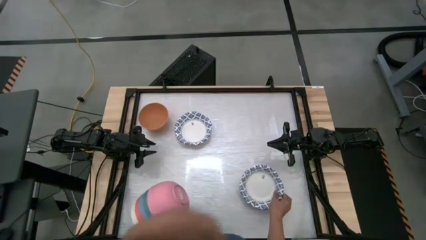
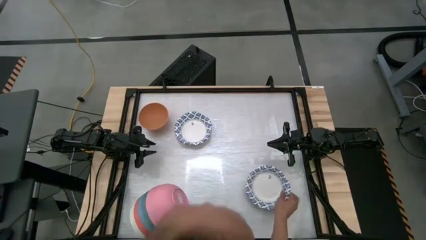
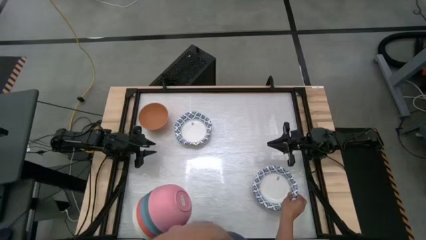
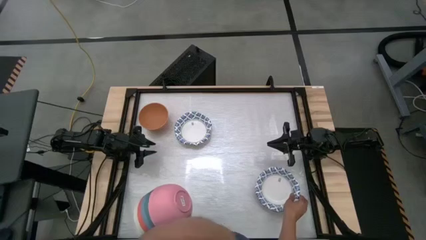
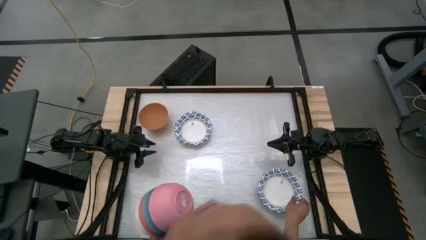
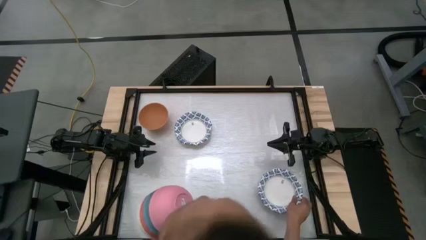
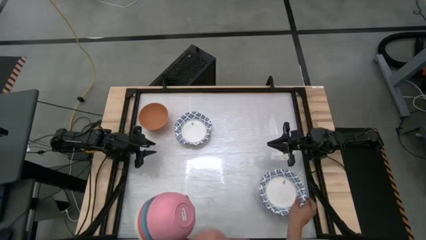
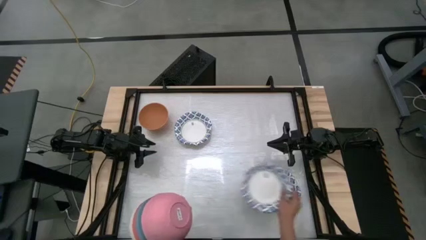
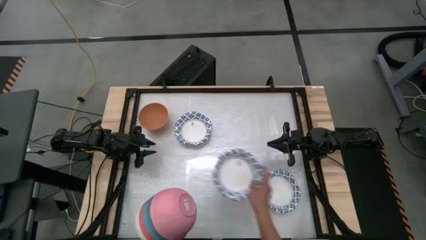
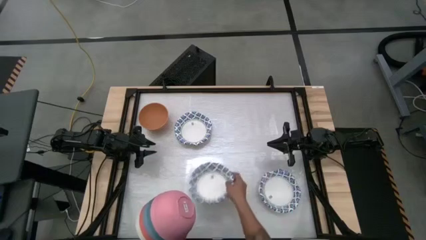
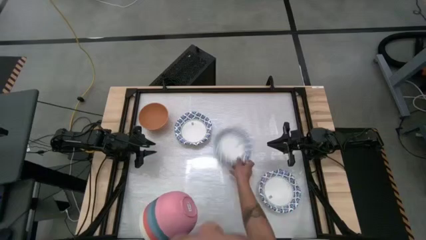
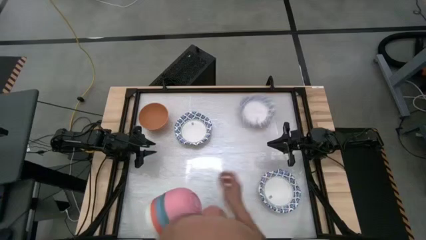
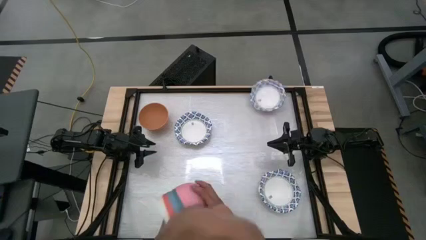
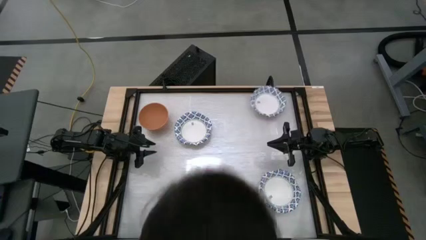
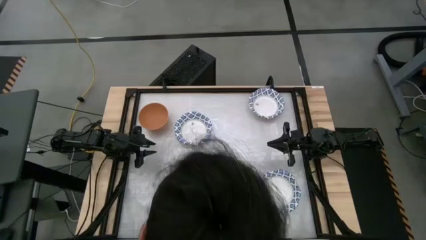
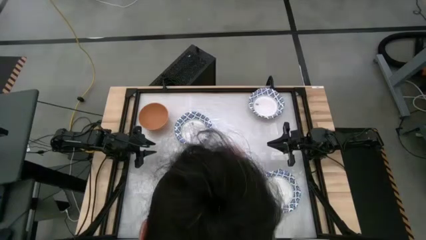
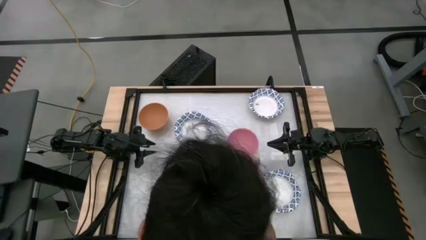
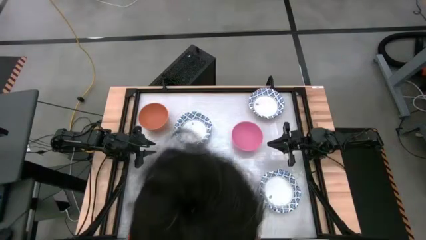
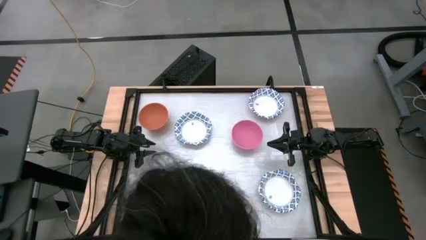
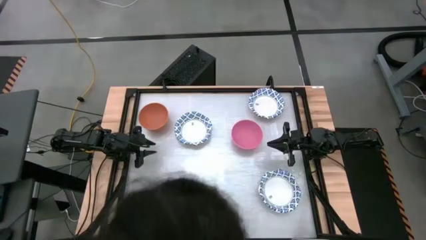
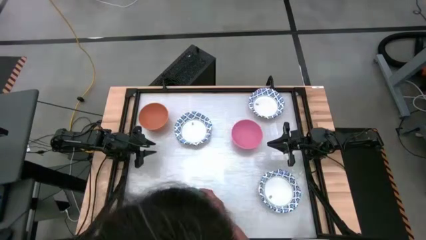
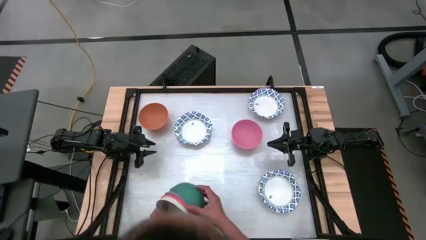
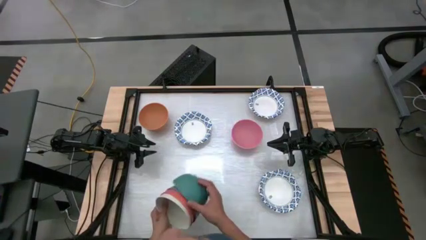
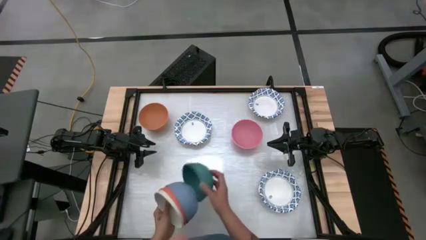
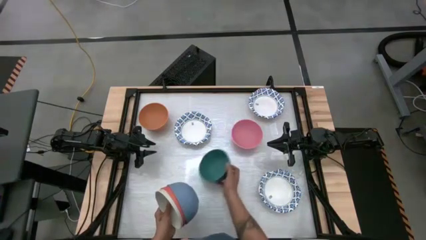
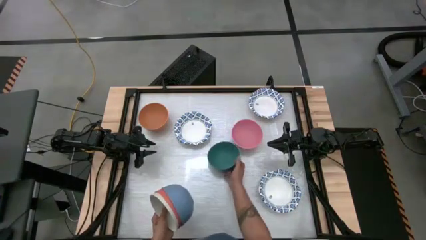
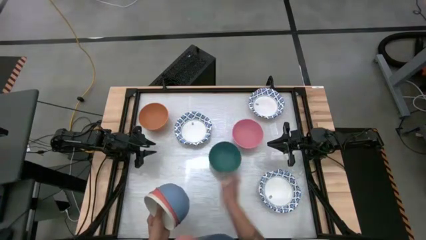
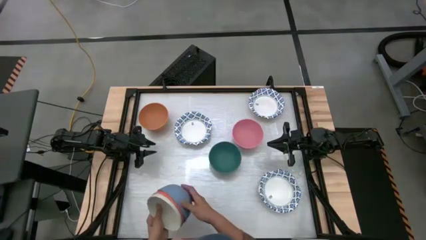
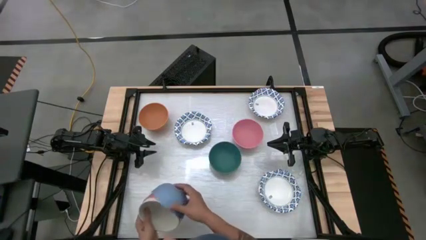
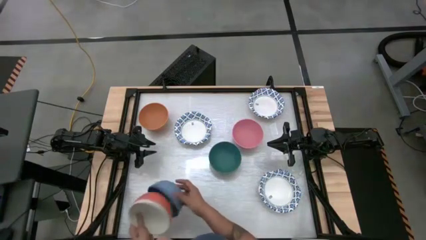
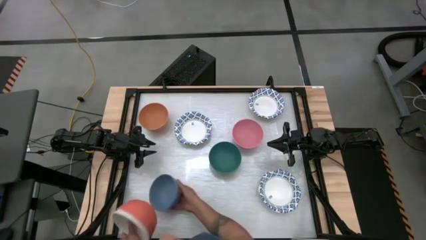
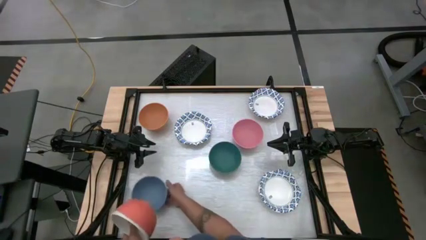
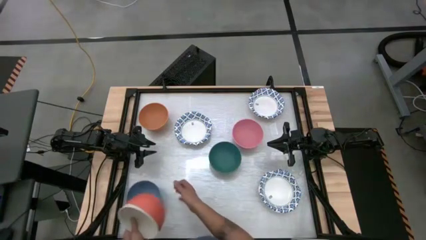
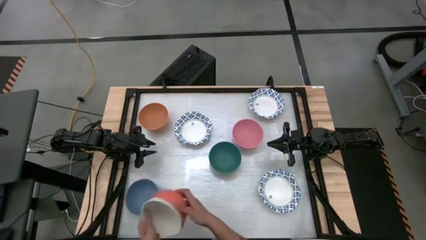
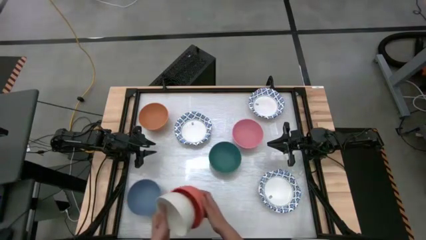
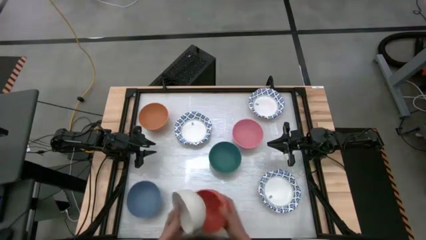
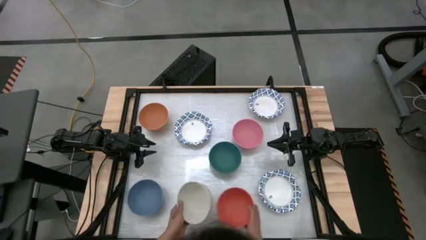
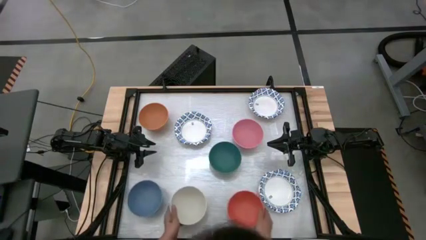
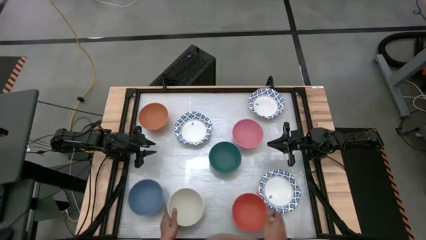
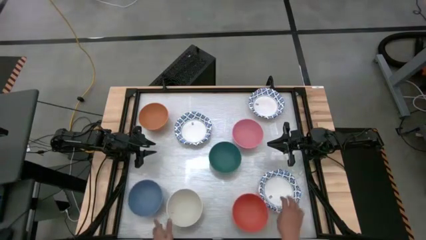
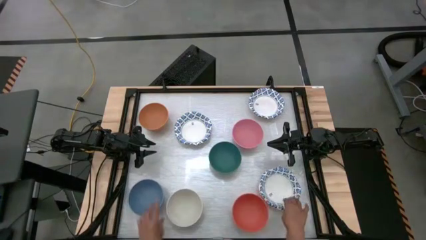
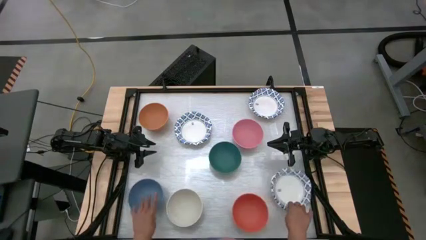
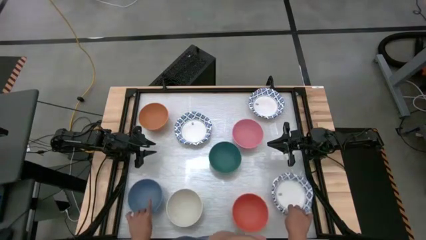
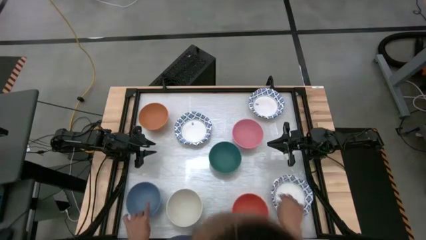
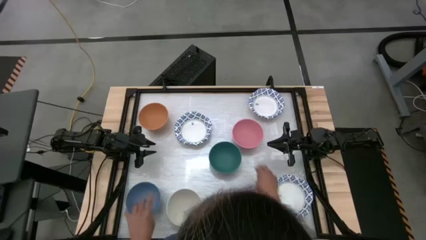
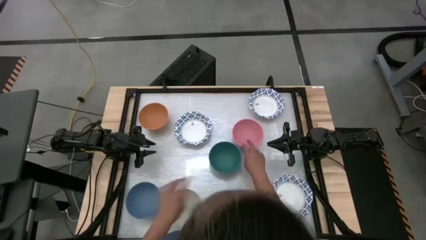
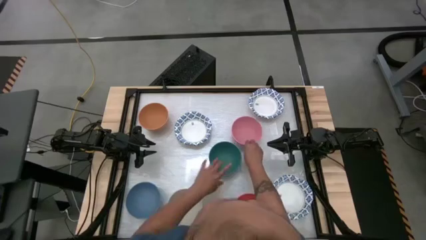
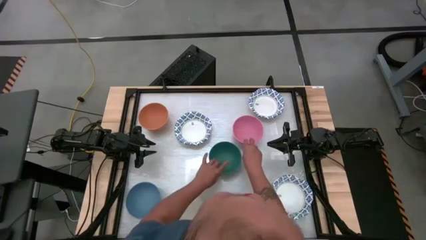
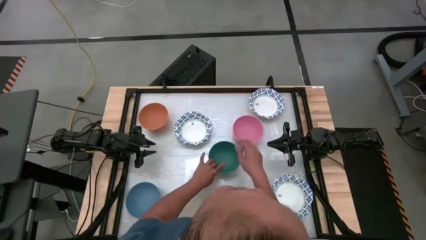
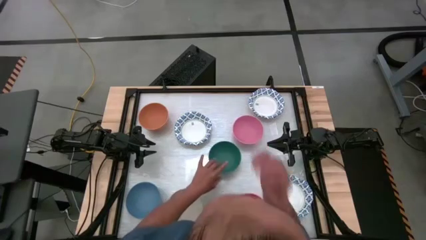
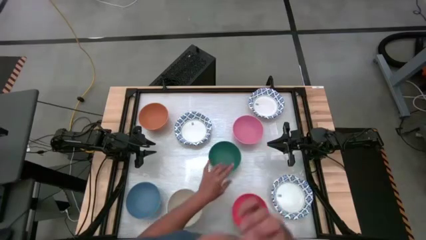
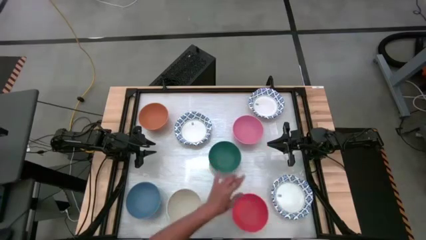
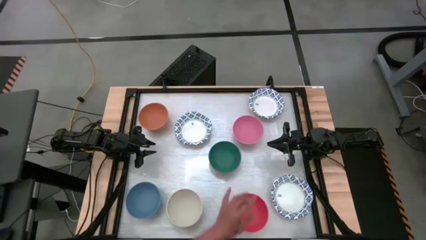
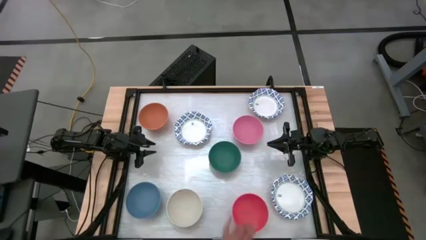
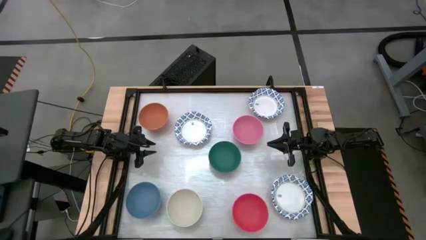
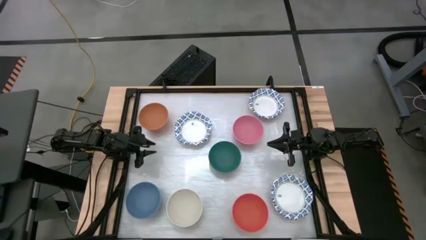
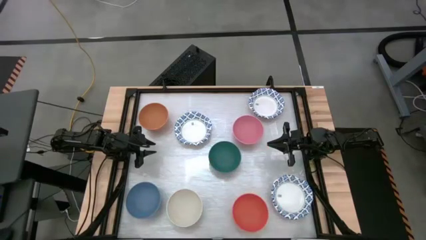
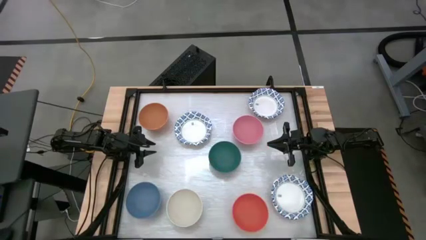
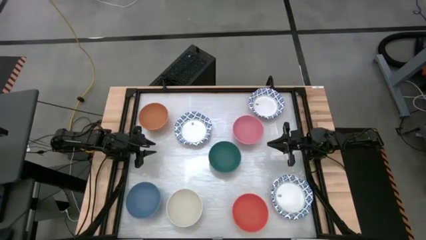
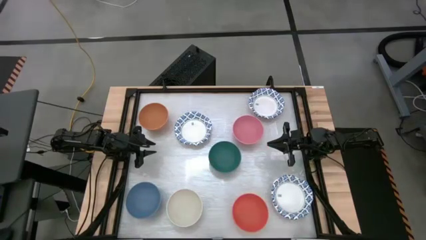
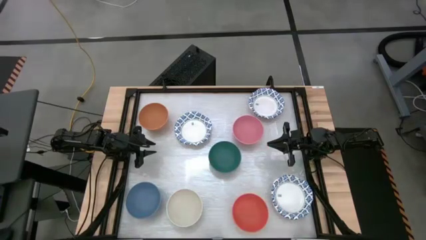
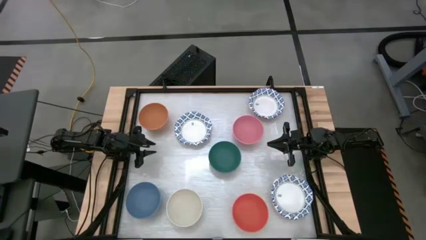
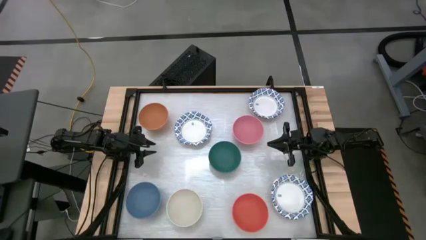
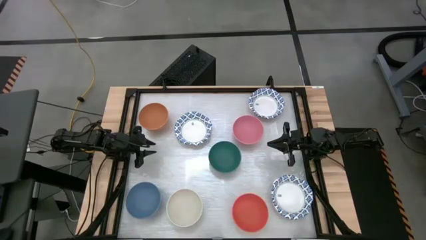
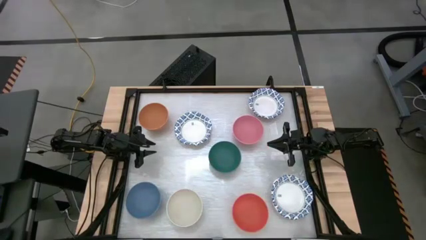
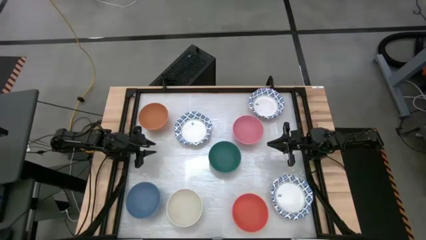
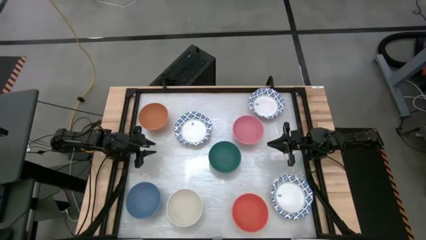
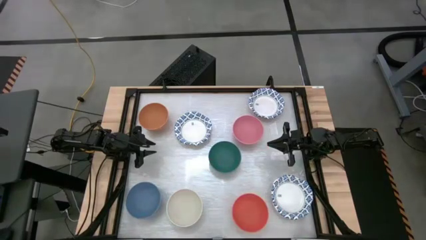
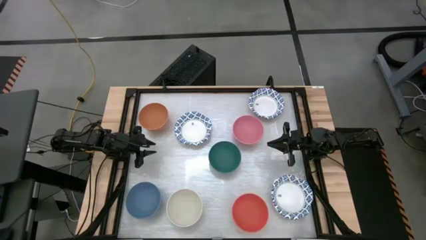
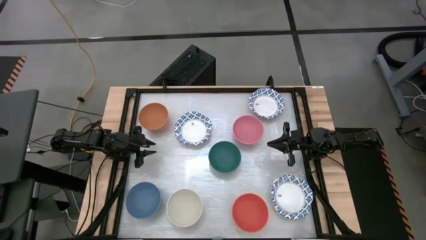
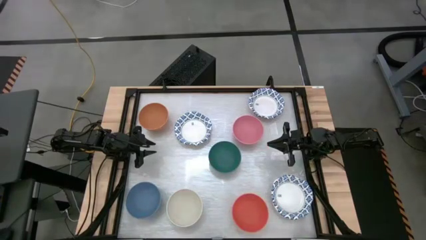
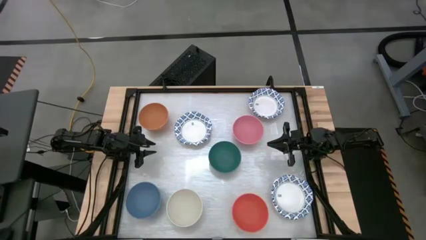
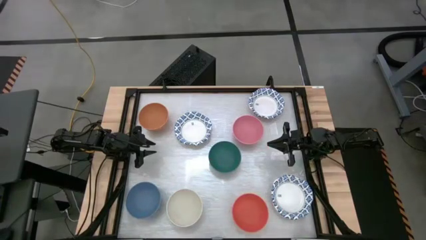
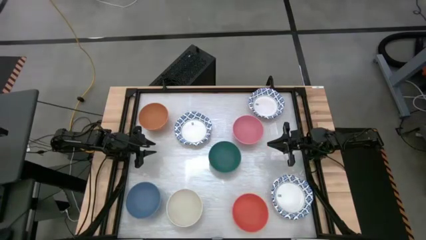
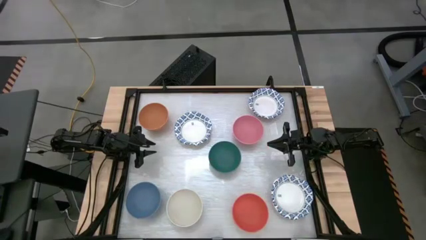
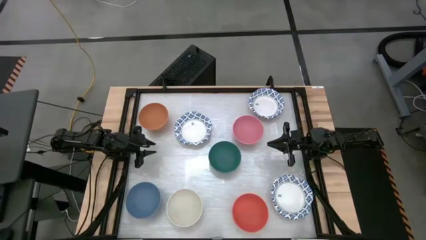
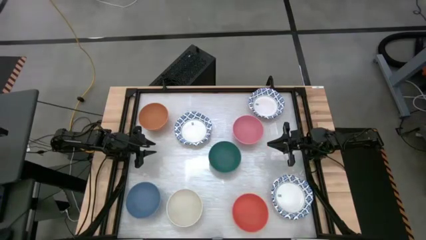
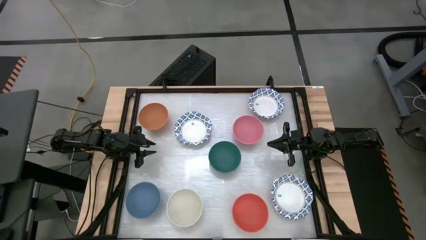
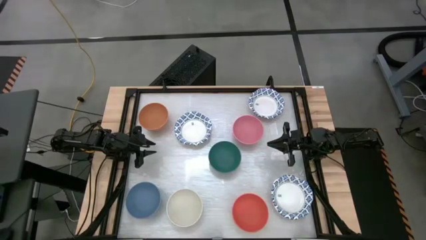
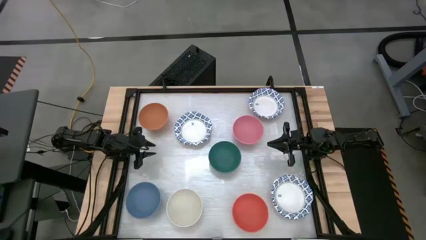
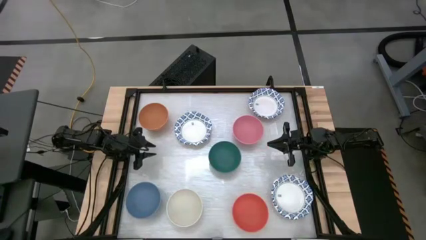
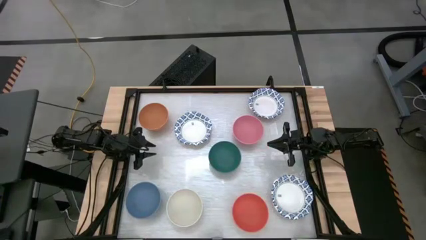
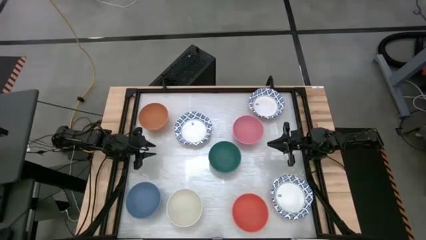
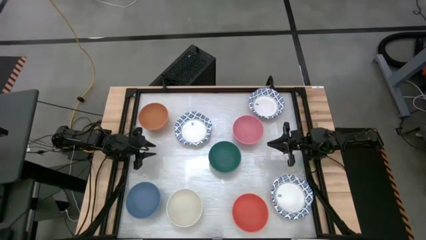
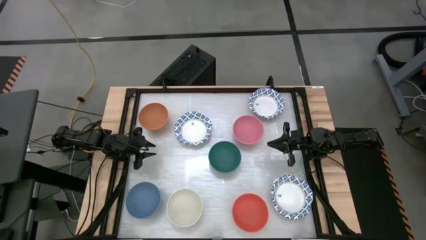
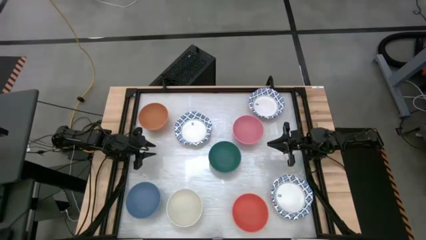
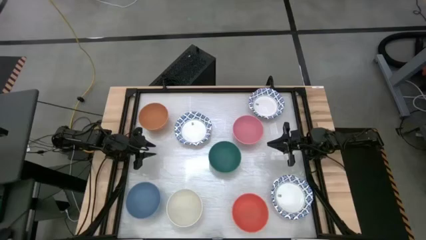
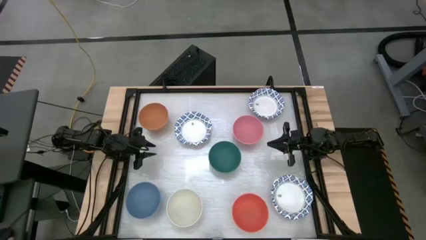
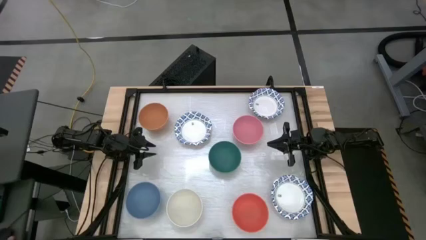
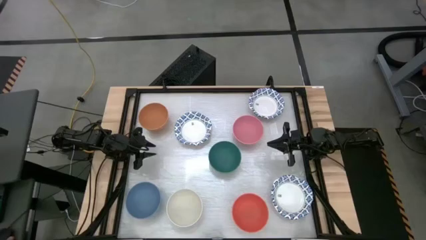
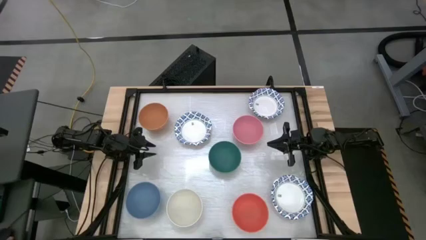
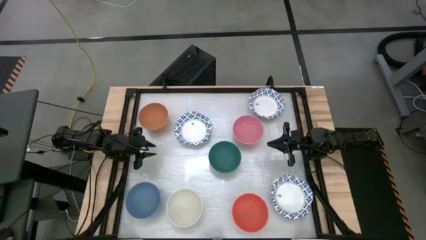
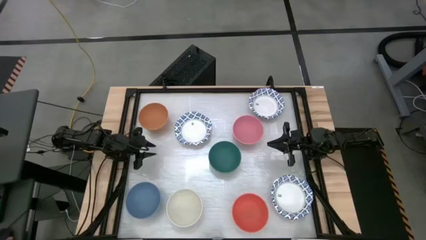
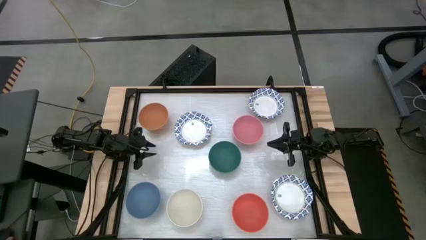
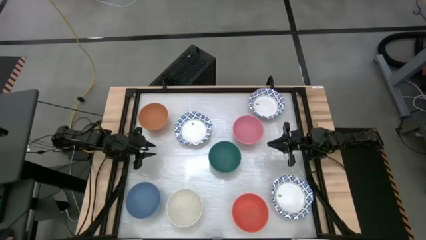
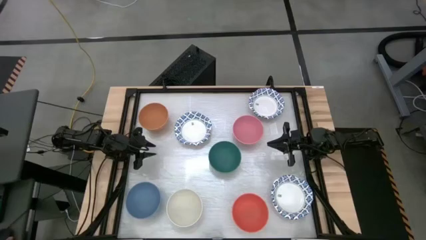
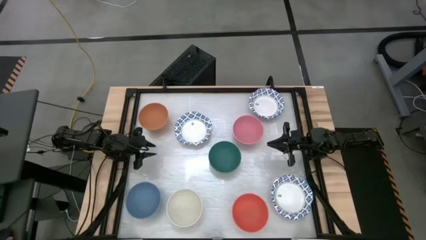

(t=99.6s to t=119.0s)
Return to Home Position
